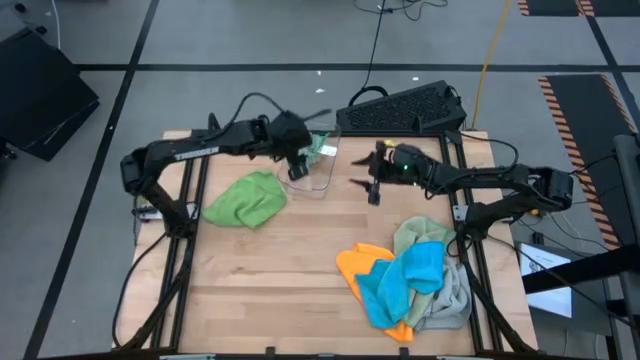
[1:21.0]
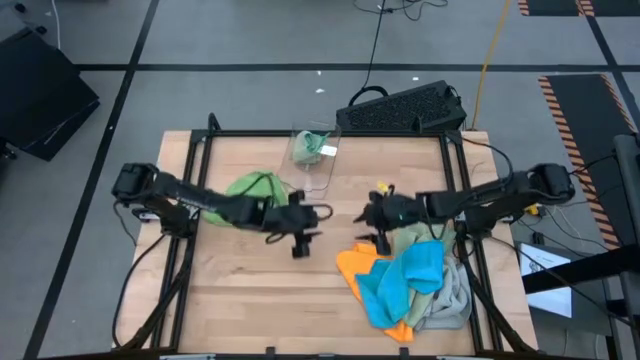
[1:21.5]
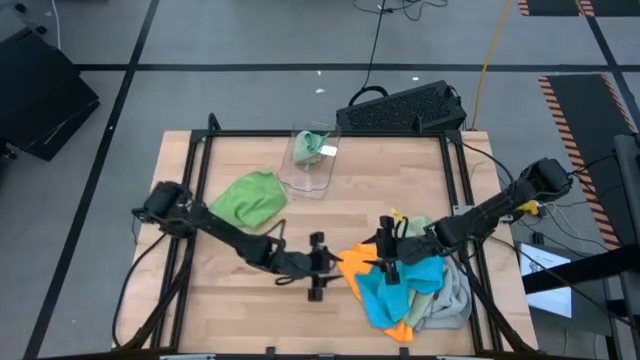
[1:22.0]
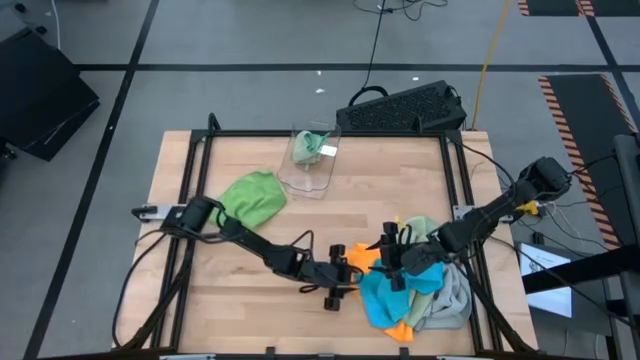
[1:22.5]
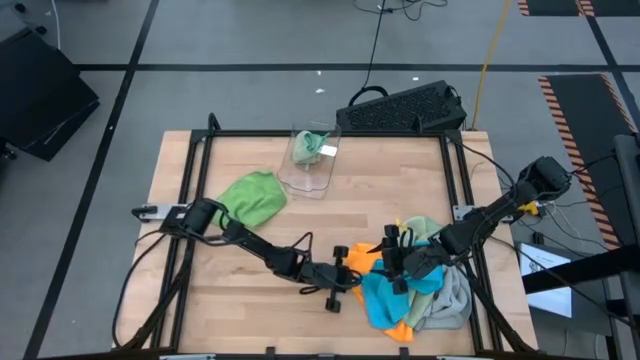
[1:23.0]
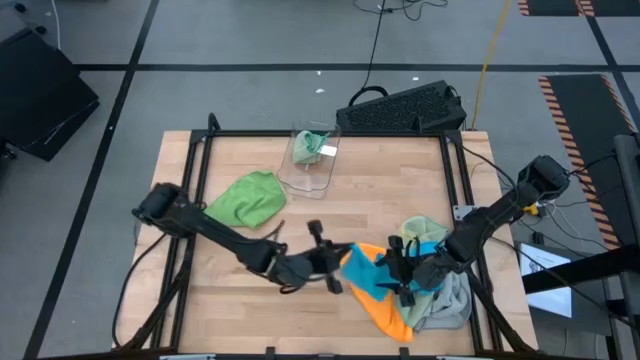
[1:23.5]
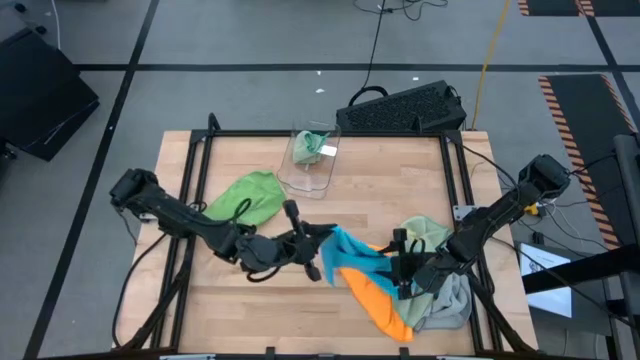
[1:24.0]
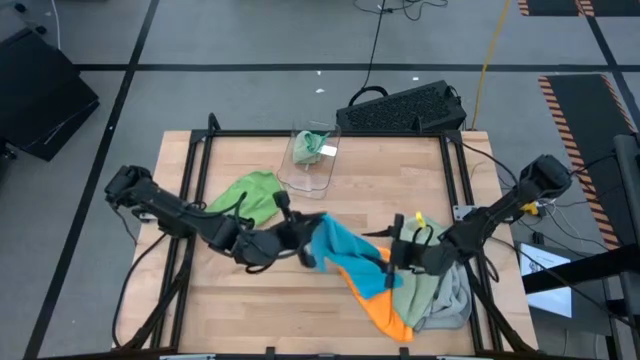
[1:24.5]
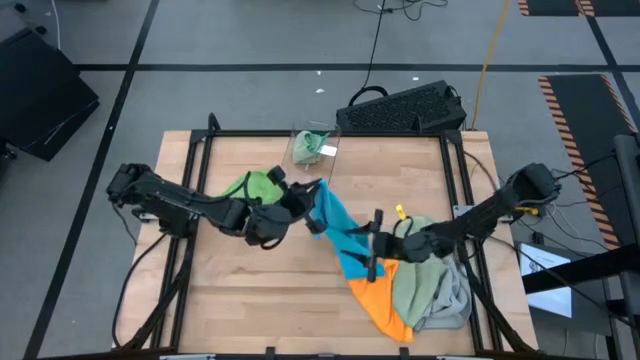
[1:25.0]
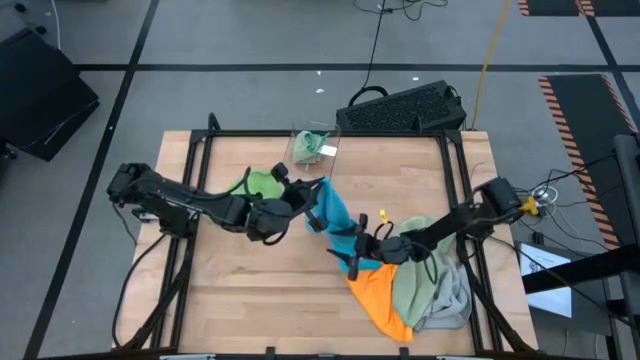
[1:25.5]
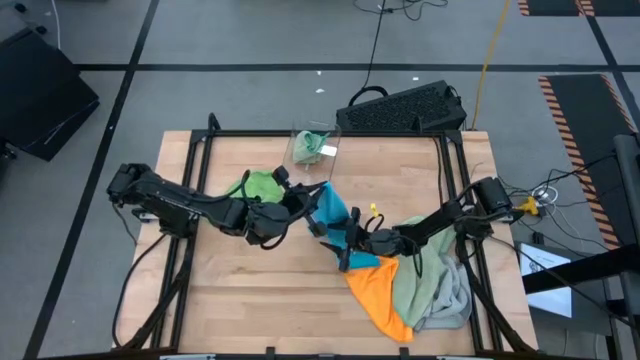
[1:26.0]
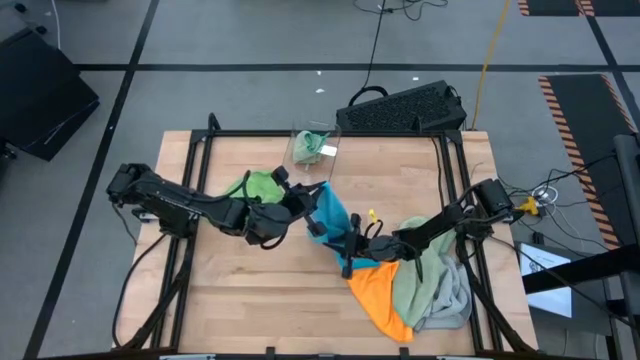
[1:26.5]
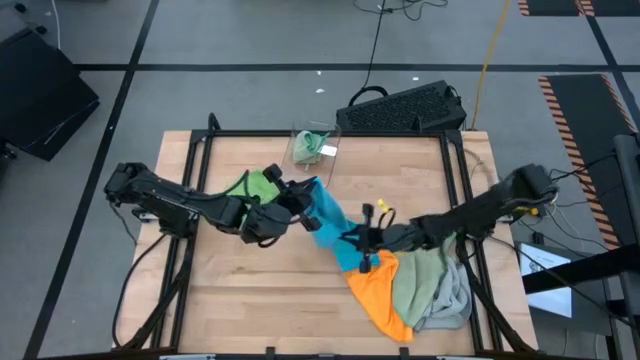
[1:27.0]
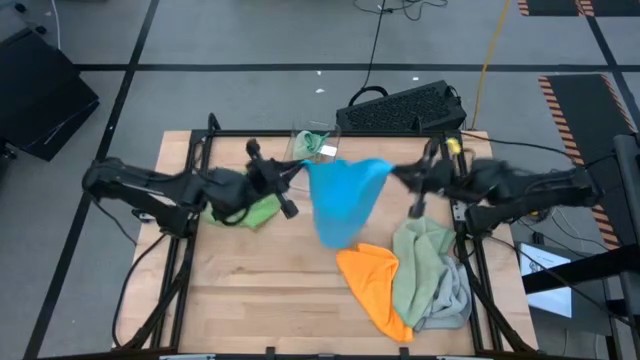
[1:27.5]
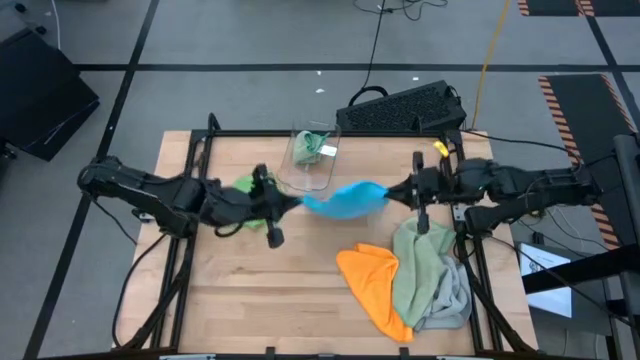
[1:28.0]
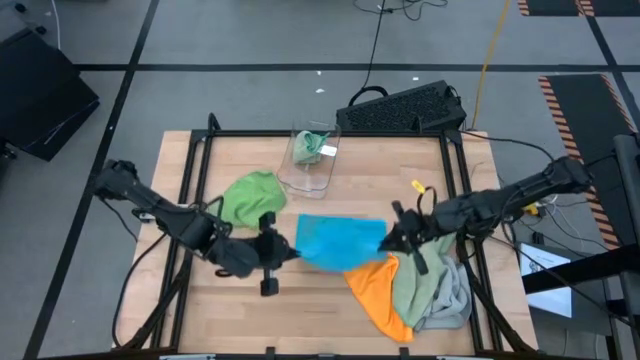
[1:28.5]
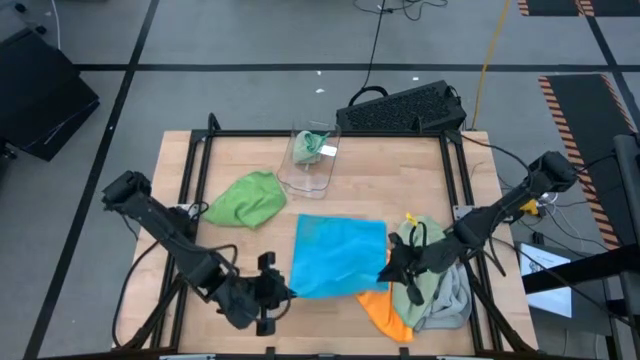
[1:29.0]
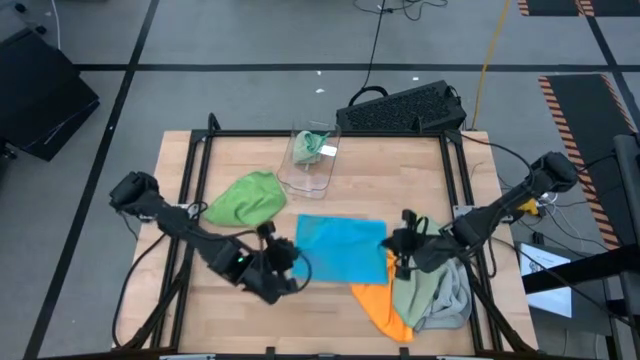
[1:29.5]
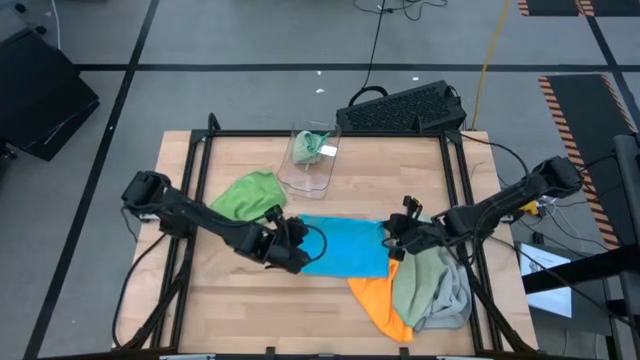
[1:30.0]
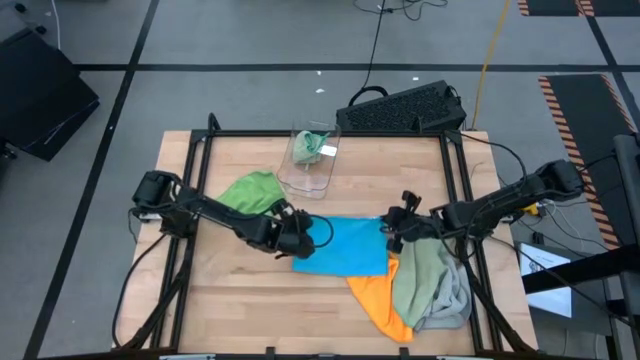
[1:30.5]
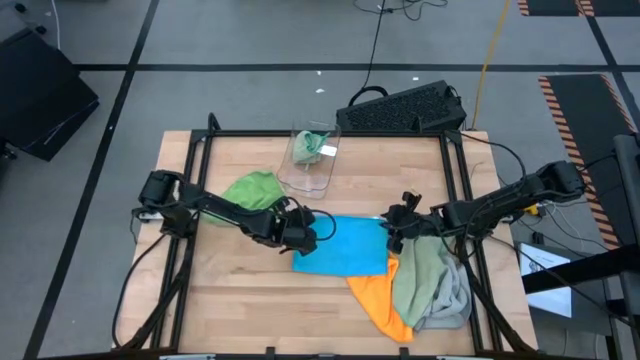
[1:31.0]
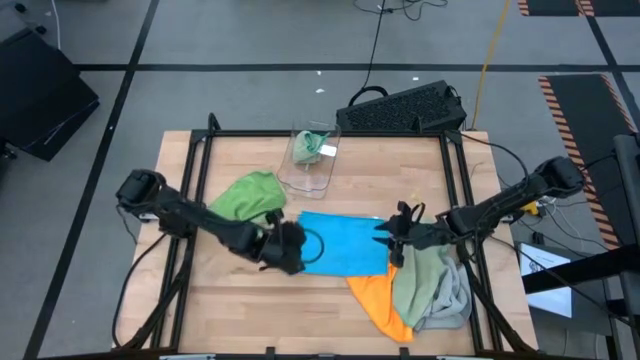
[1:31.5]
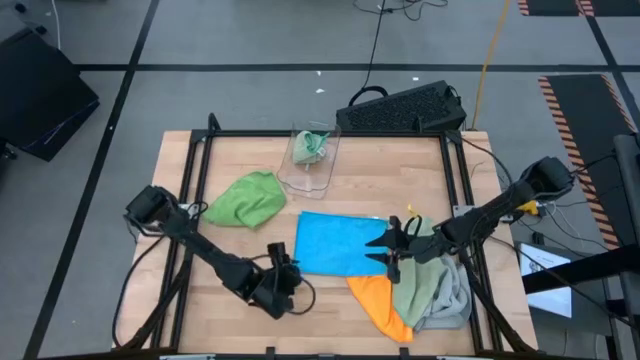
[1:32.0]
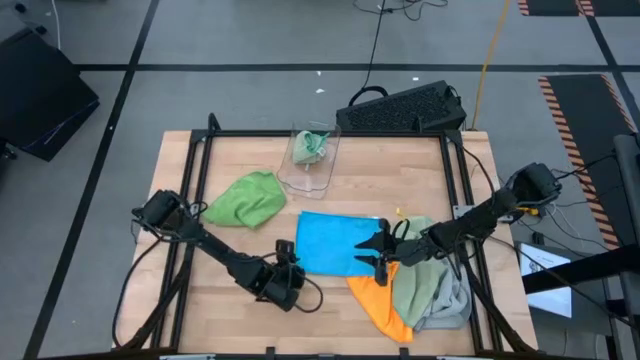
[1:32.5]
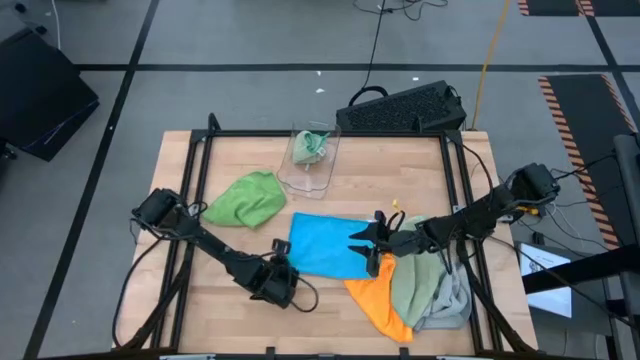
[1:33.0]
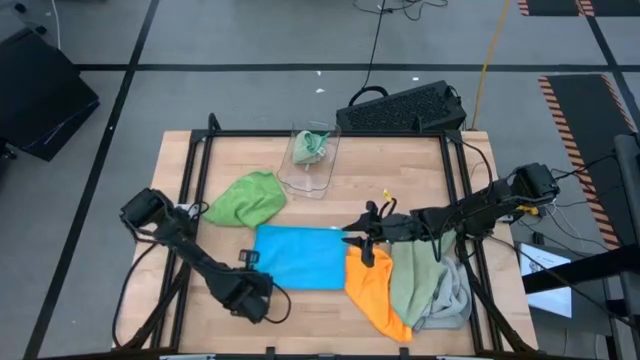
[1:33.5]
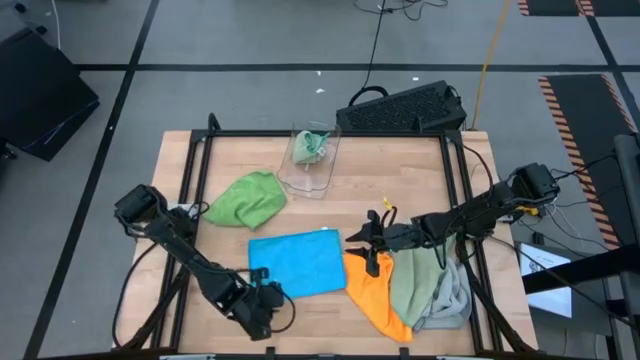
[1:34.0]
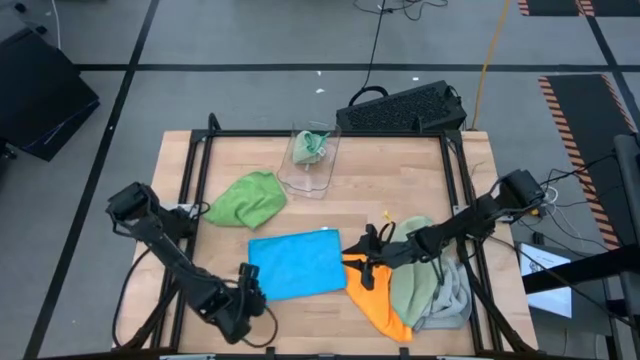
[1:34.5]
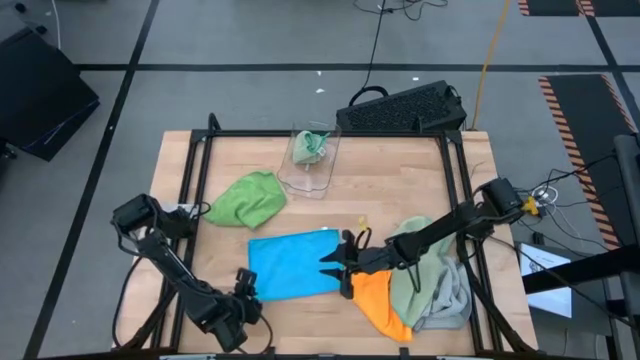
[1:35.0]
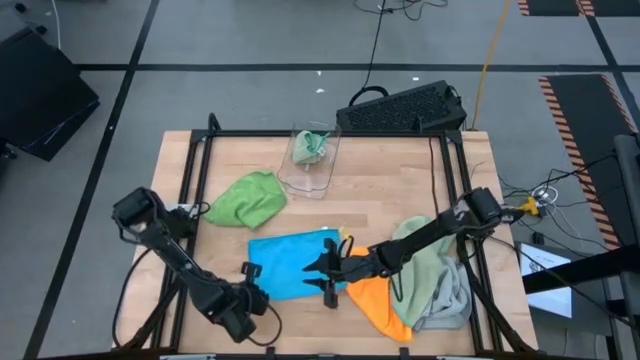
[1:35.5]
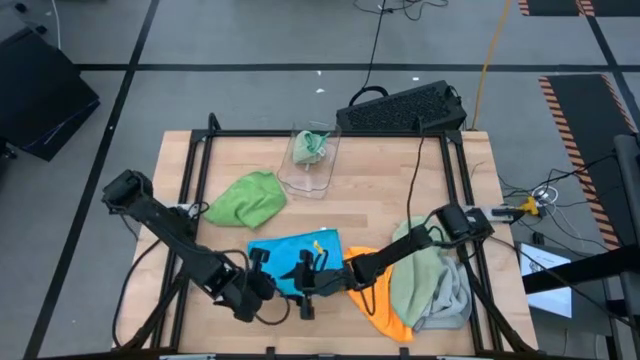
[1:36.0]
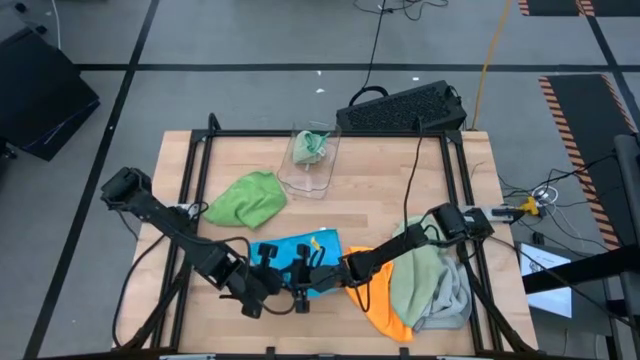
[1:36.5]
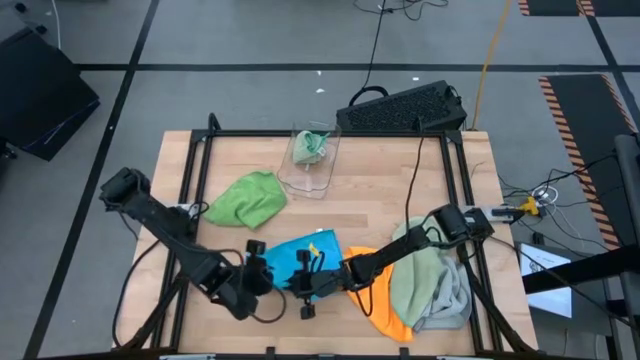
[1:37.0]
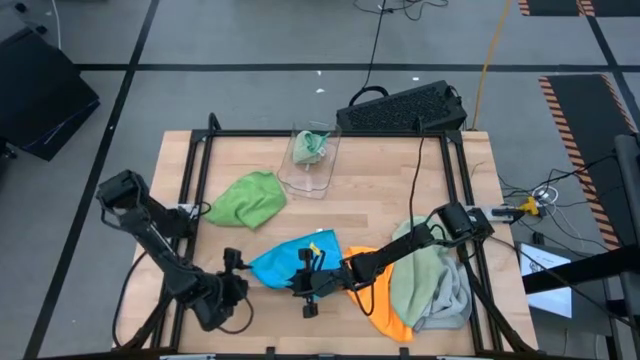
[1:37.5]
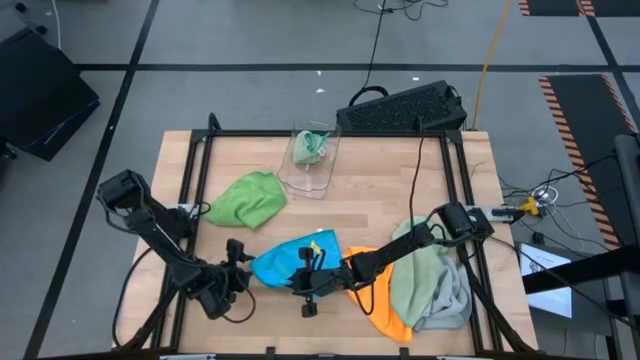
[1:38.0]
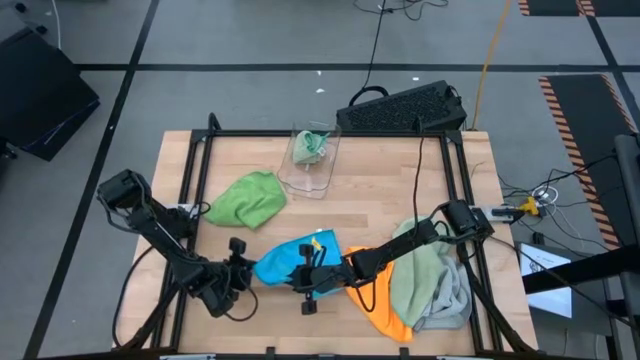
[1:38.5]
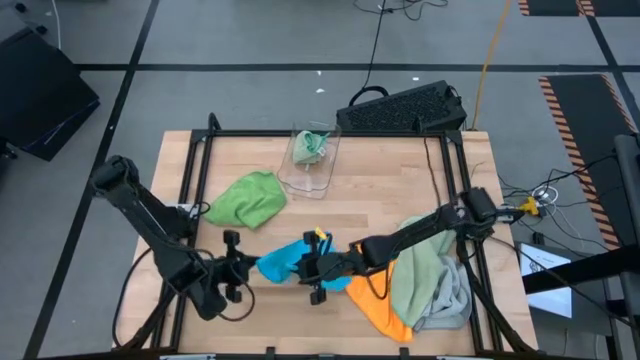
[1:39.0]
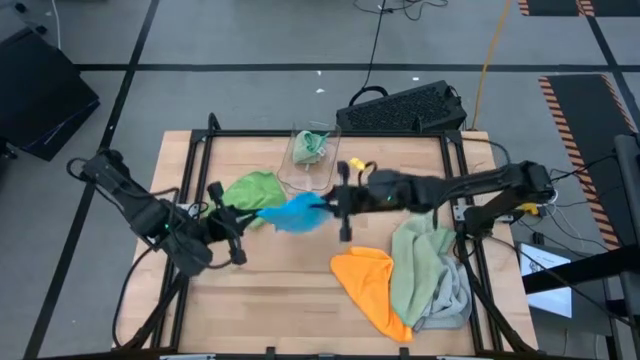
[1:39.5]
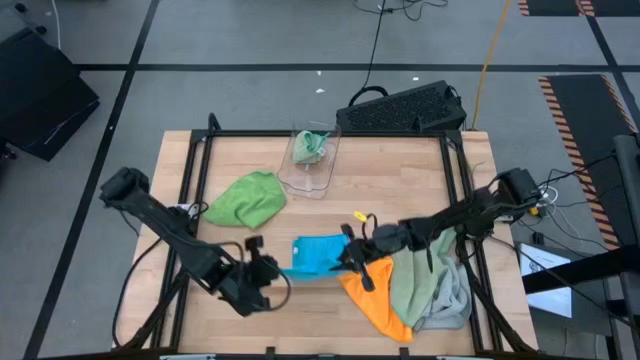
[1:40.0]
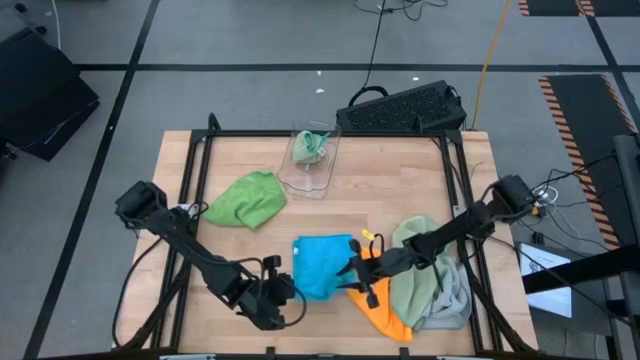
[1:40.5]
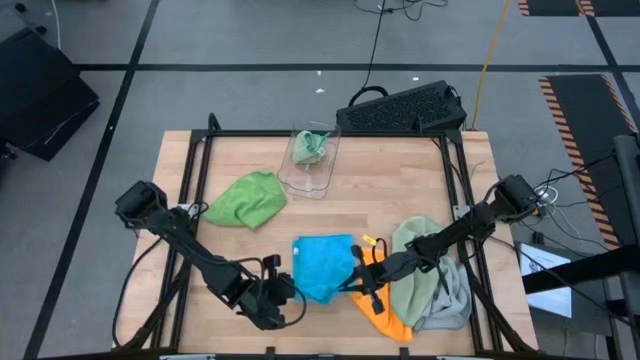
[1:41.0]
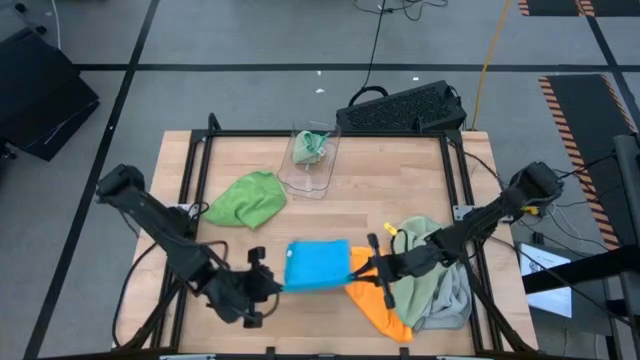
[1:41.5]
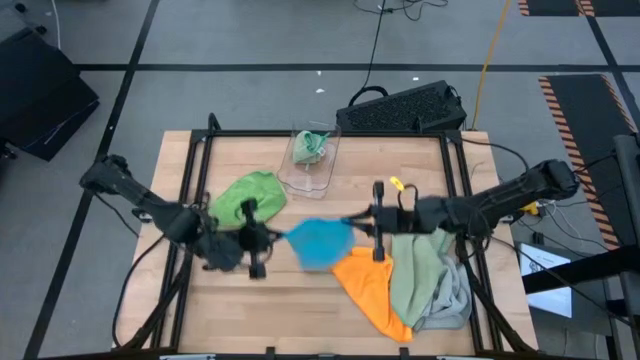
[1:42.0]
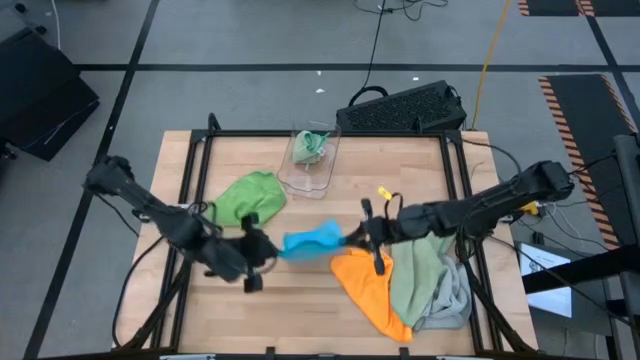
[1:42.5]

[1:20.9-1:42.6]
Task: Fold microfiber towels
Fold the blue towel
